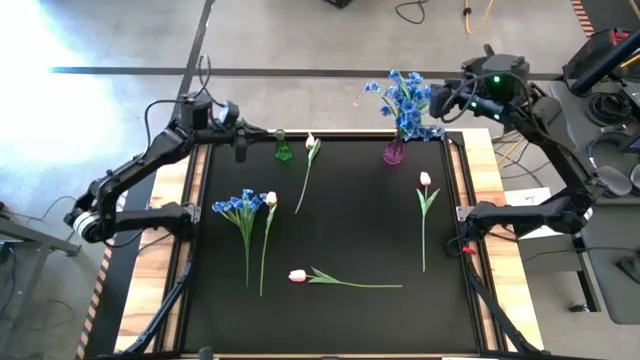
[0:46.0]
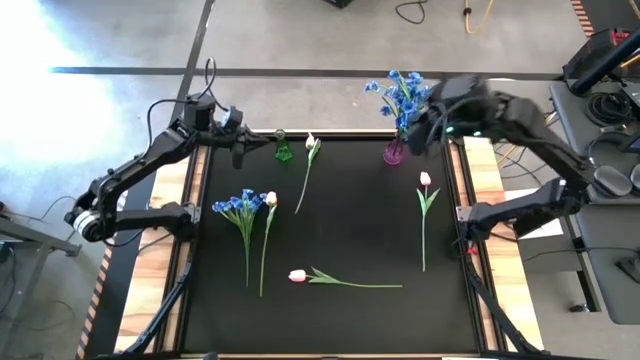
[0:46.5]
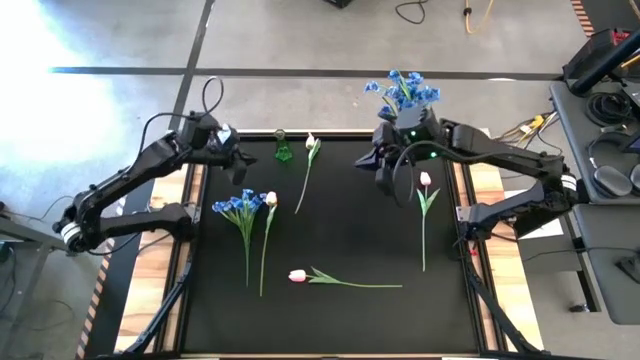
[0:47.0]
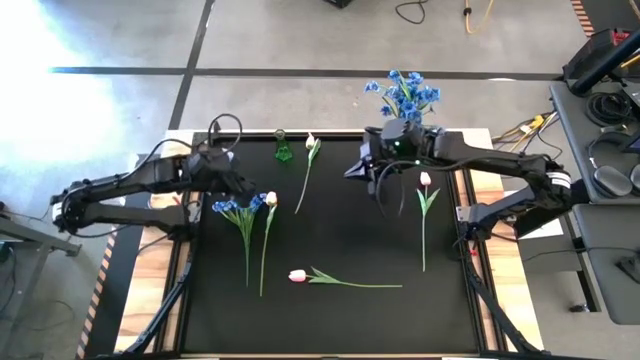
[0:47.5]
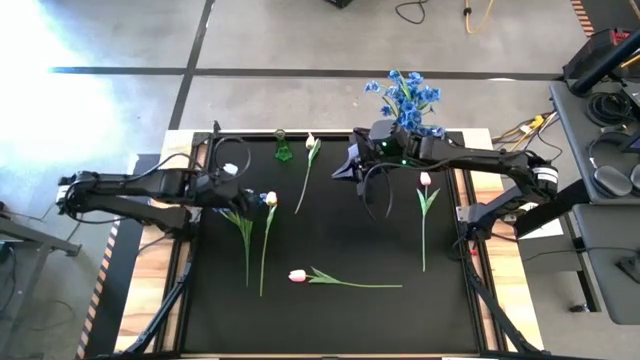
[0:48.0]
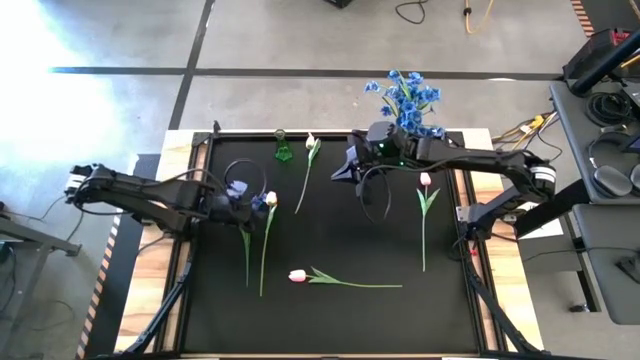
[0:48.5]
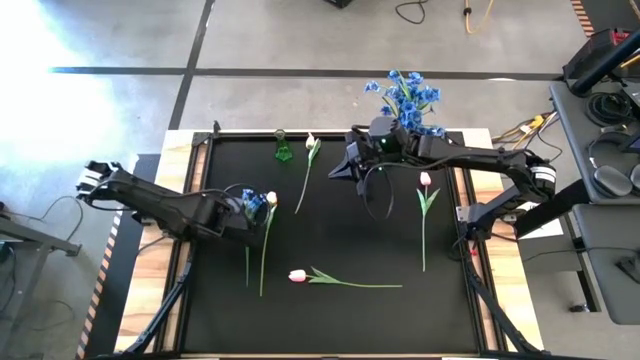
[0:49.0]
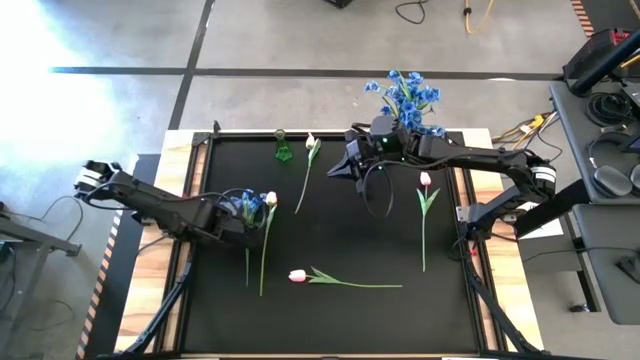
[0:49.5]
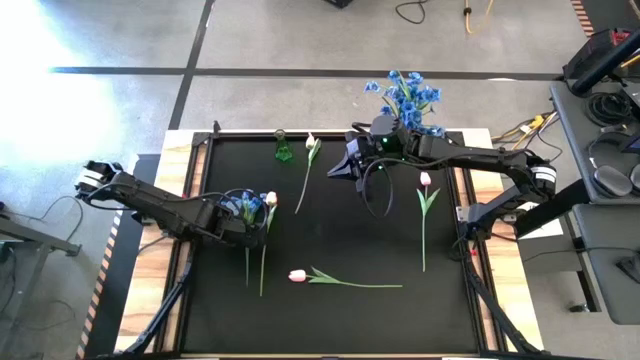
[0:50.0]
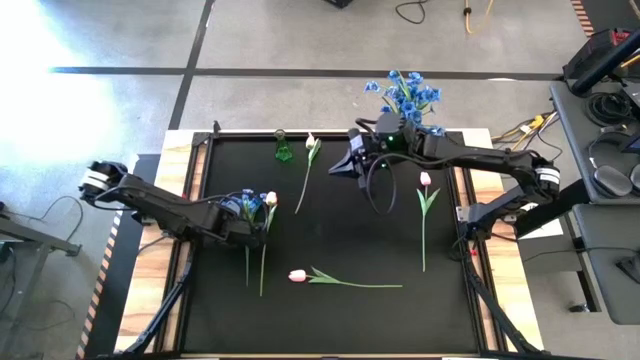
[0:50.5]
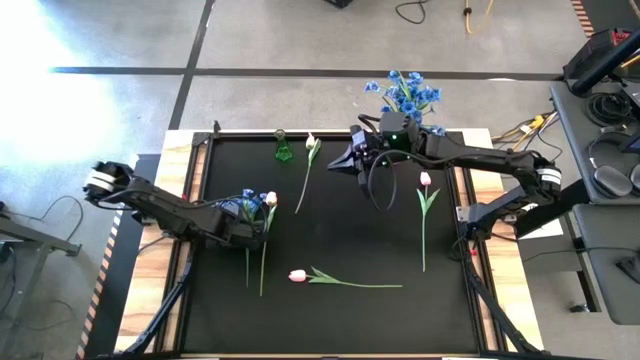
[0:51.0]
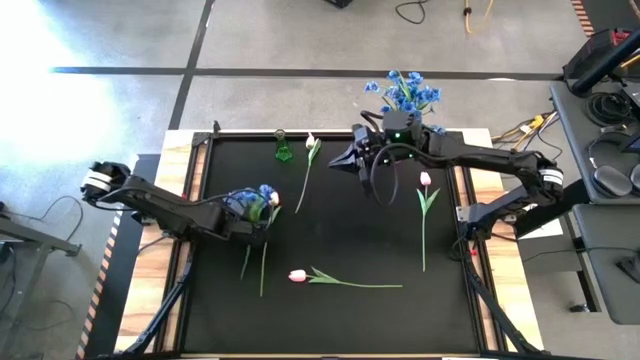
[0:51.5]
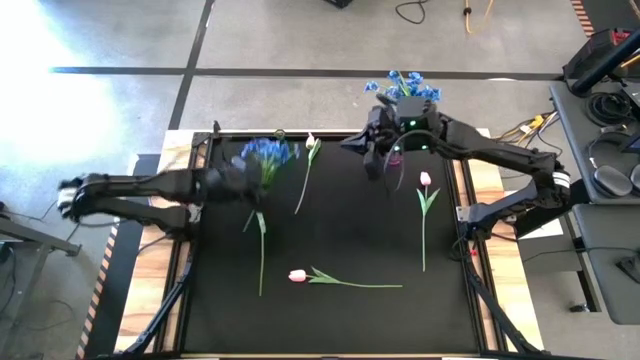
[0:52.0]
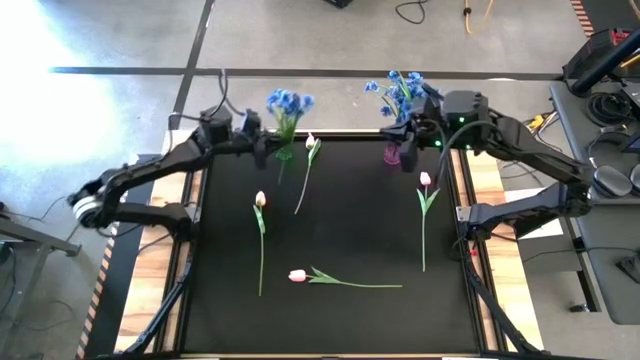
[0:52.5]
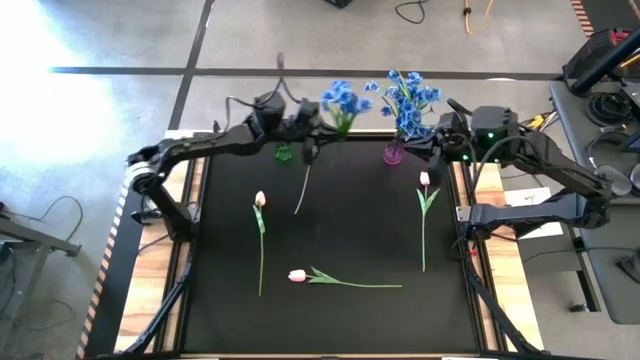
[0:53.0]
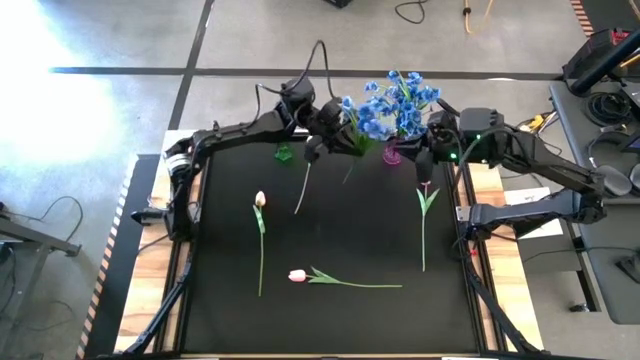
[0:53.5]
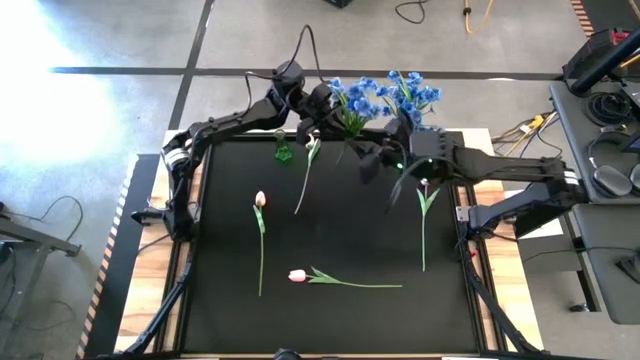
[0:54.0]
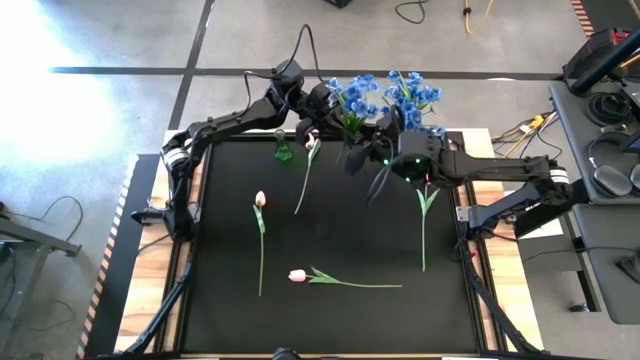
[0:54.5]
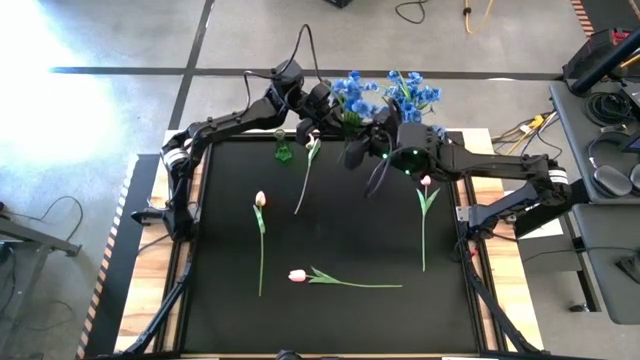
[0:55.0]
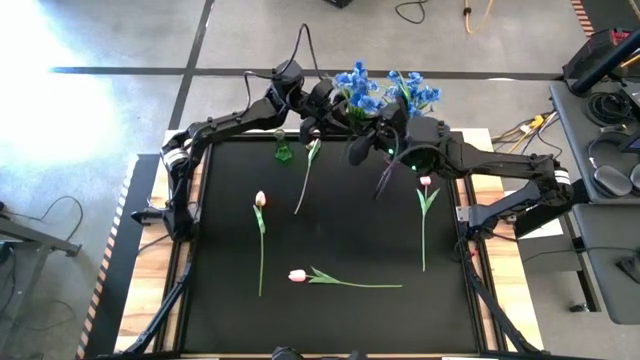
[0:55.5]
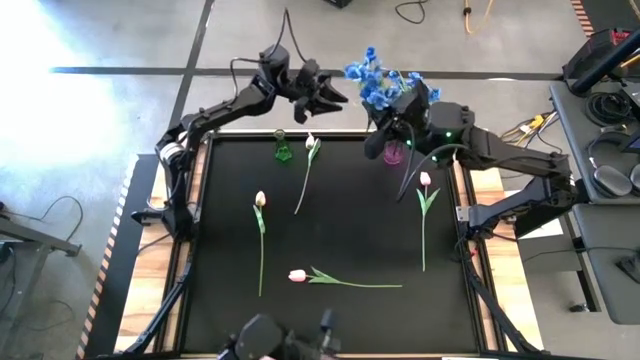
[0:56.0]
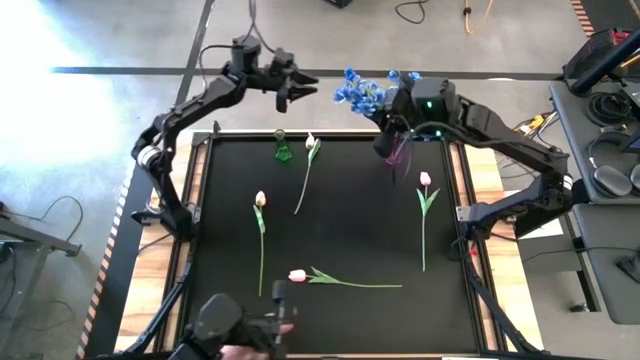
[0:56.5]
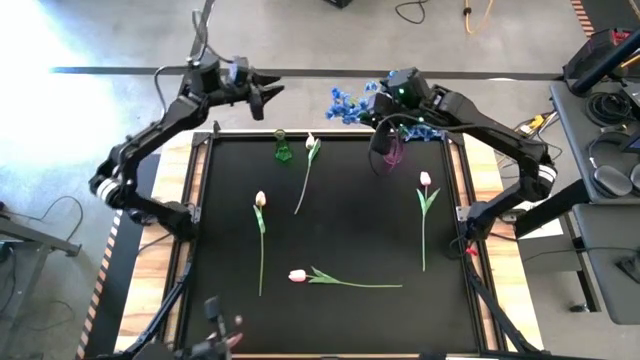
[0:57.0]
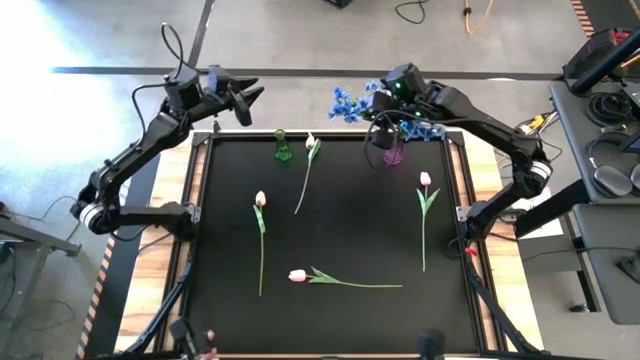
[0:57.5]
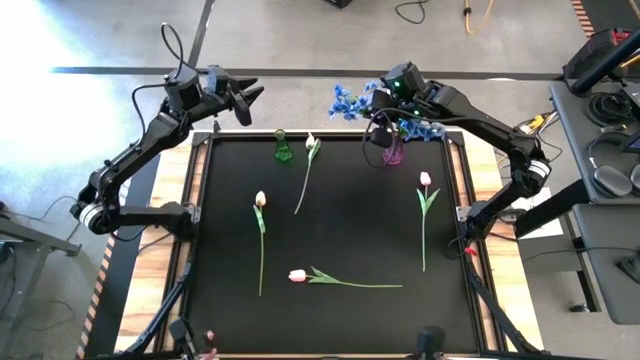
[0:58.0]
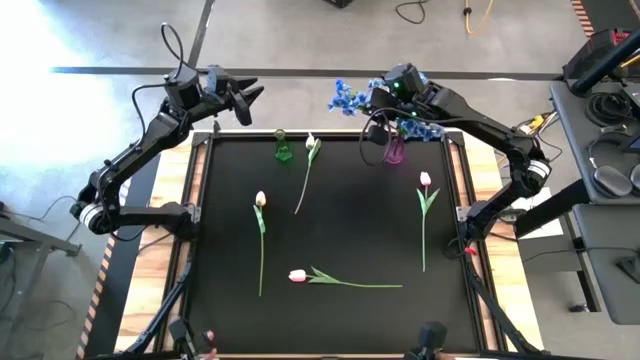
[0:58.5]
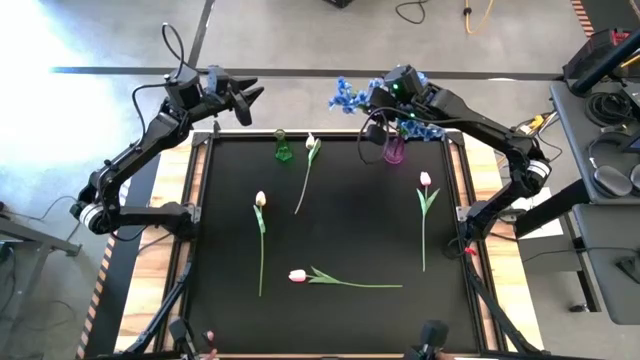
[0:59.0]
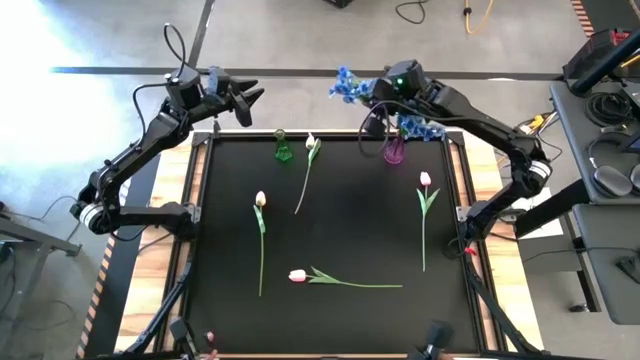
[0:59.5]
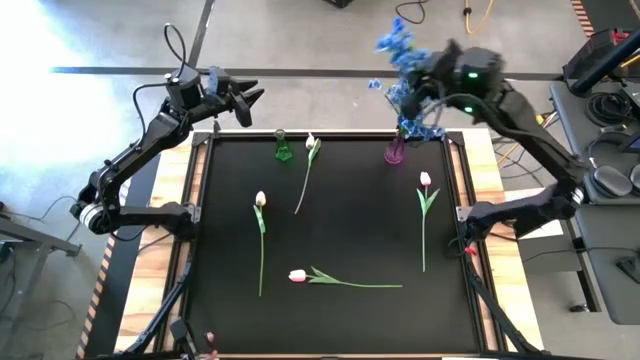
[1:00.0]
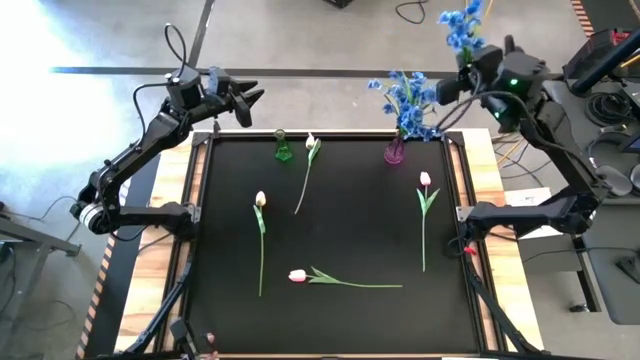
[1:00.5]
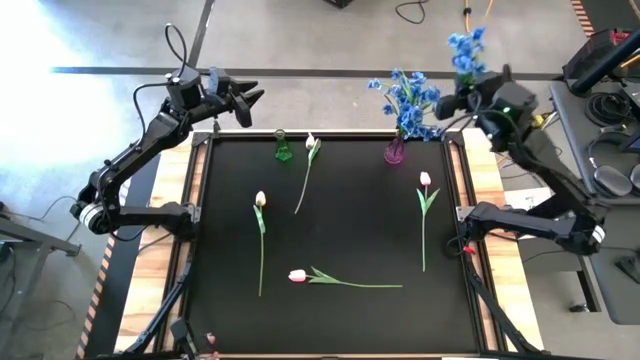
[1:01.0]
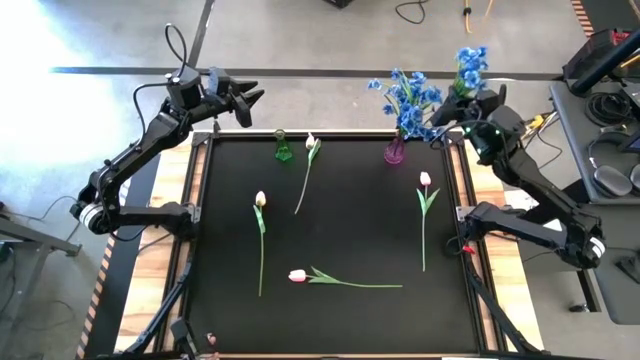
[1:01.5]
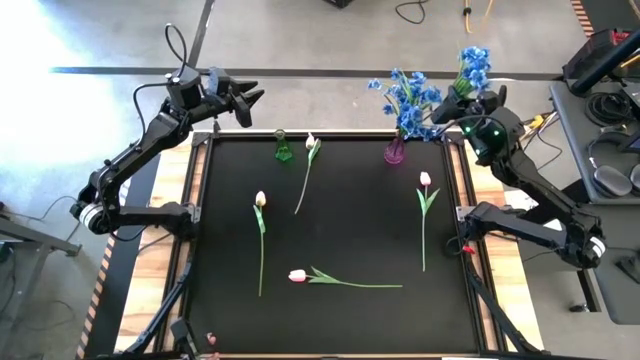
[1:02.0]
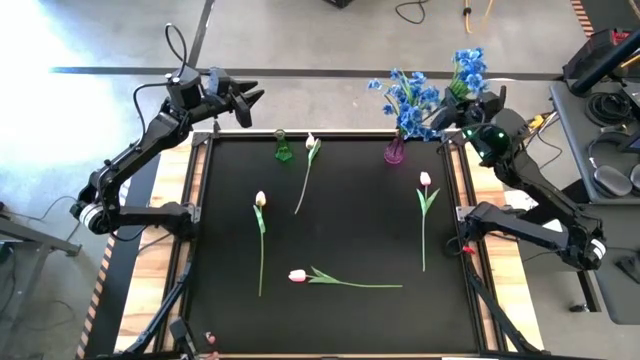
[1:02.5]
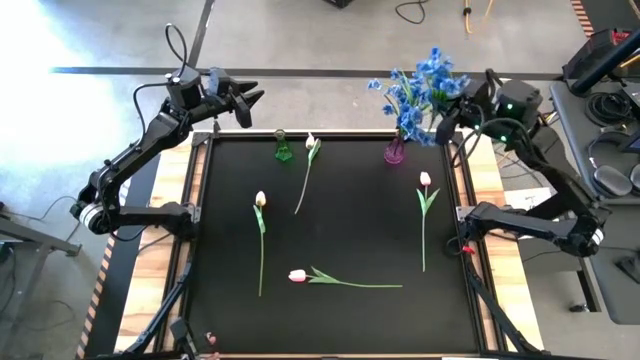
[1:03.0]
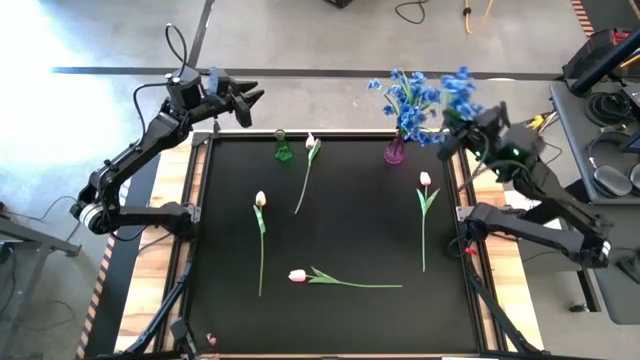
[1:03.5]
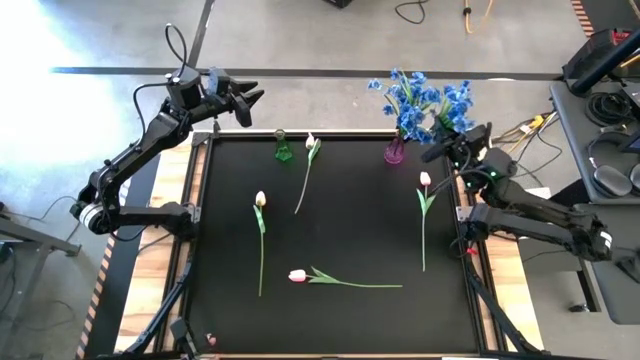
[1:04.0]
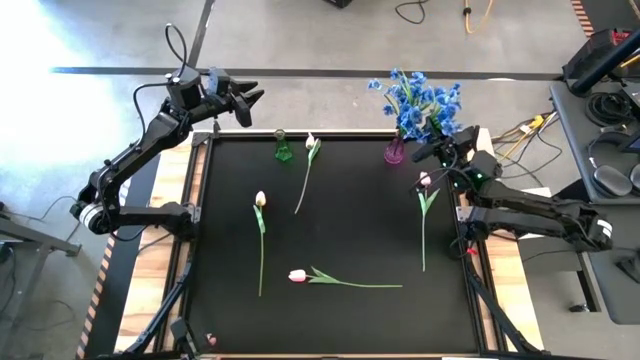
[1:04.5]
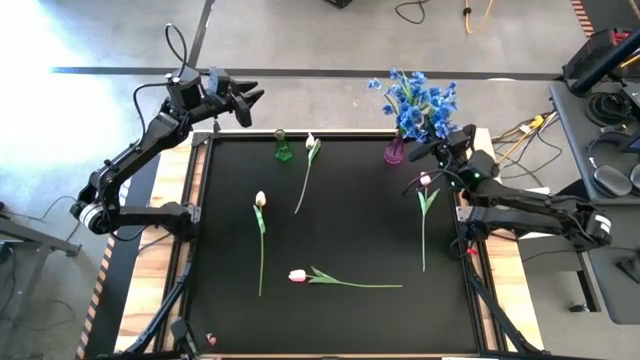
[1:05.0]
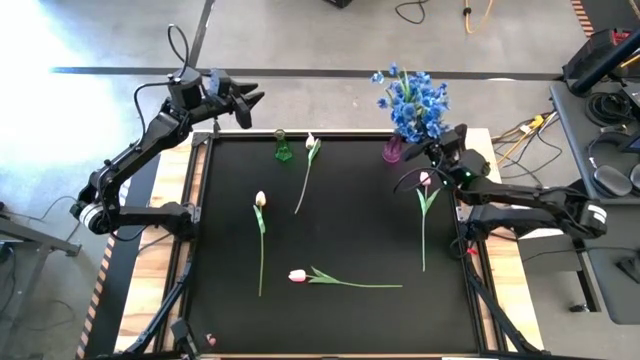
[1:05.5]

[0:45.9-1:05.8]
Task: Sort flowers into vase by color
Put the blue flowers into the violet vase
